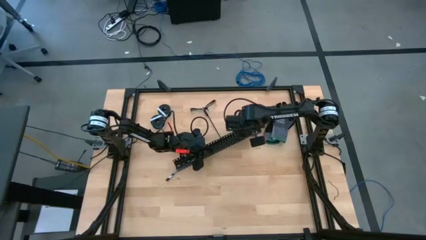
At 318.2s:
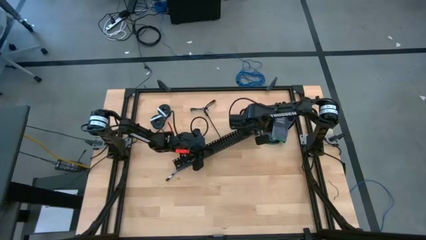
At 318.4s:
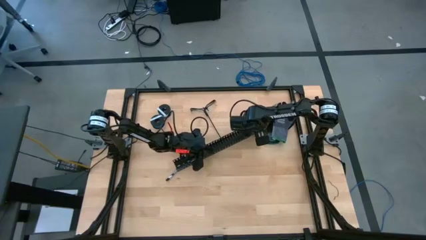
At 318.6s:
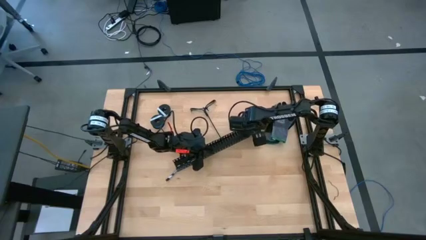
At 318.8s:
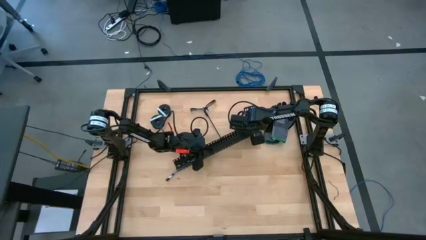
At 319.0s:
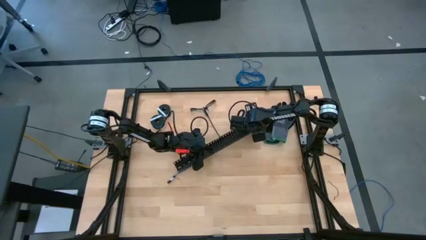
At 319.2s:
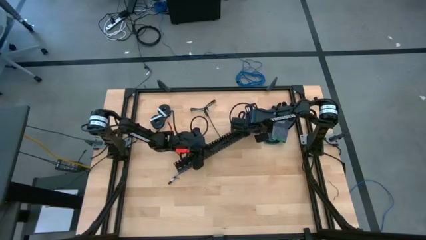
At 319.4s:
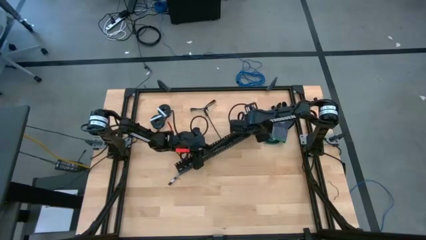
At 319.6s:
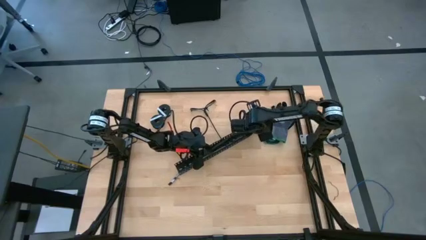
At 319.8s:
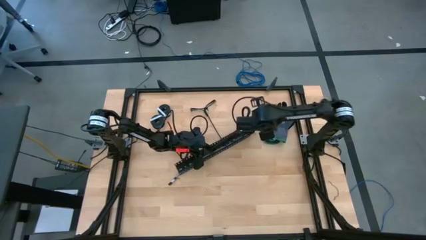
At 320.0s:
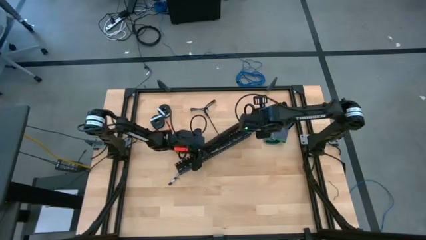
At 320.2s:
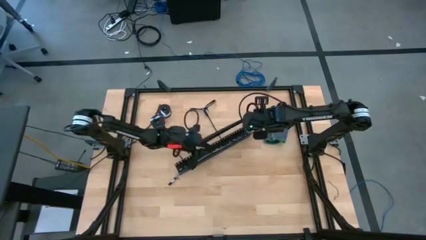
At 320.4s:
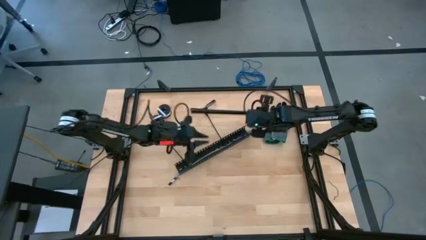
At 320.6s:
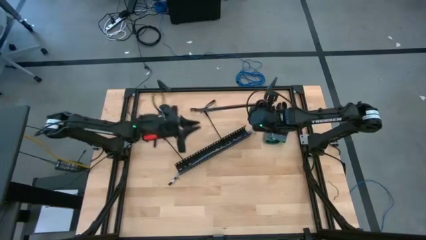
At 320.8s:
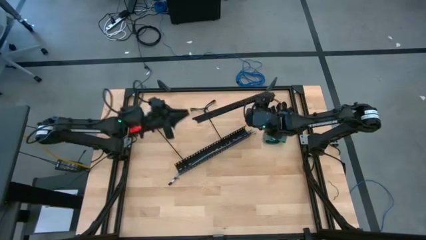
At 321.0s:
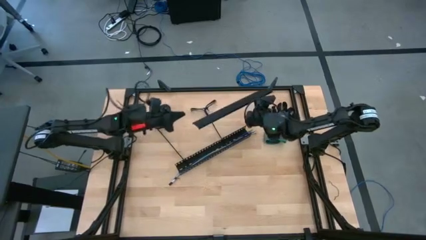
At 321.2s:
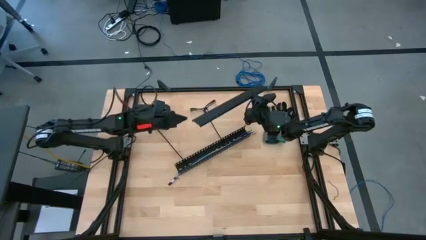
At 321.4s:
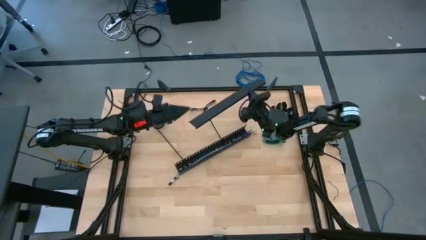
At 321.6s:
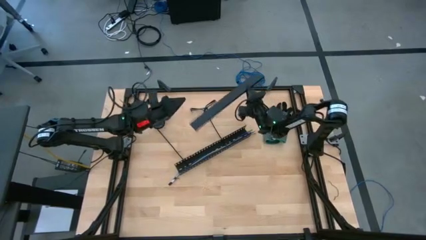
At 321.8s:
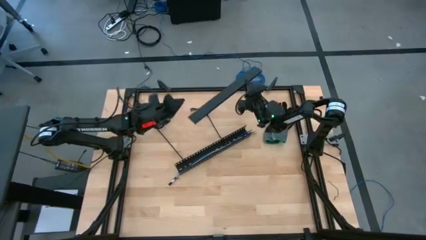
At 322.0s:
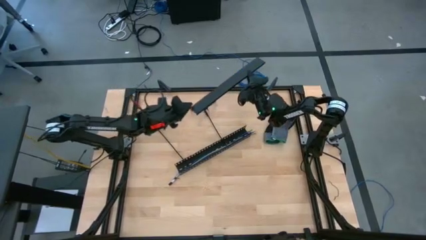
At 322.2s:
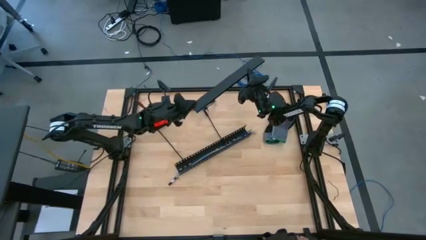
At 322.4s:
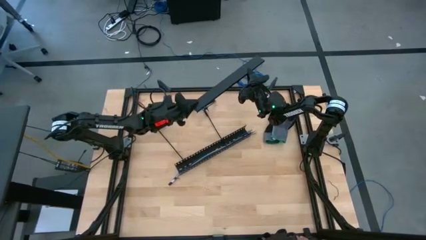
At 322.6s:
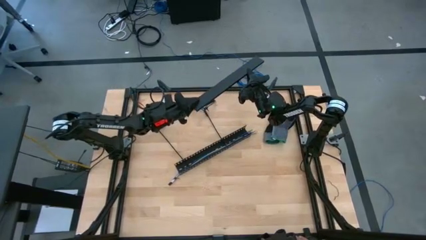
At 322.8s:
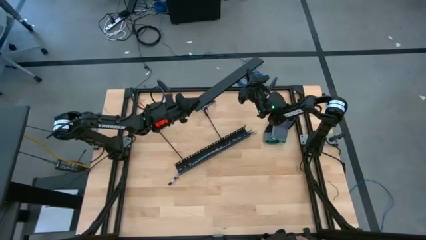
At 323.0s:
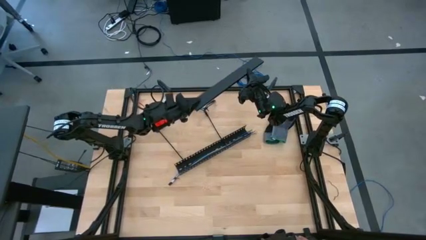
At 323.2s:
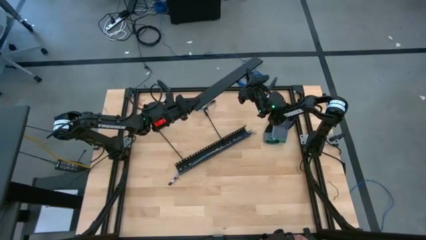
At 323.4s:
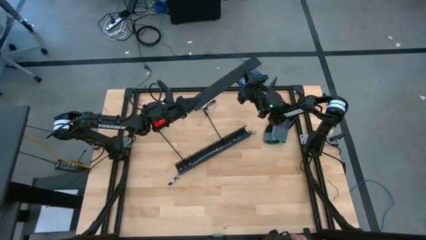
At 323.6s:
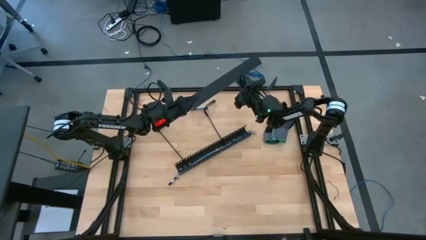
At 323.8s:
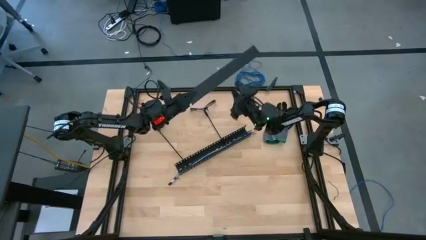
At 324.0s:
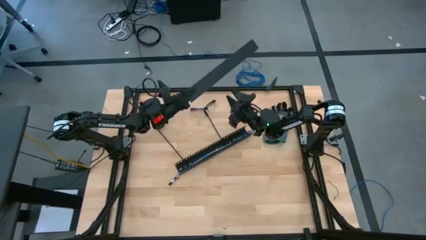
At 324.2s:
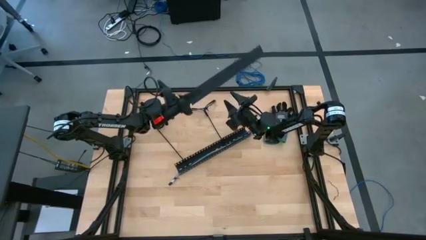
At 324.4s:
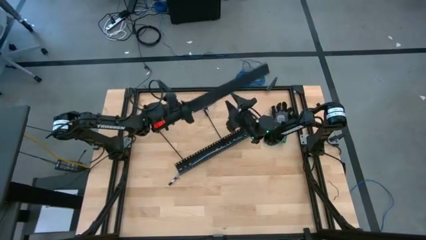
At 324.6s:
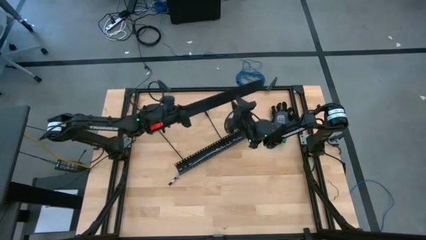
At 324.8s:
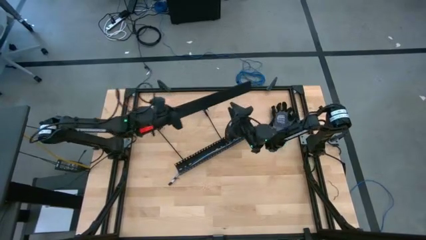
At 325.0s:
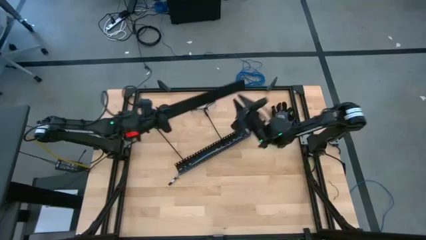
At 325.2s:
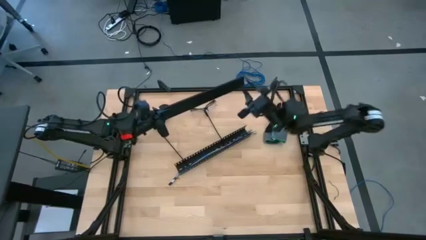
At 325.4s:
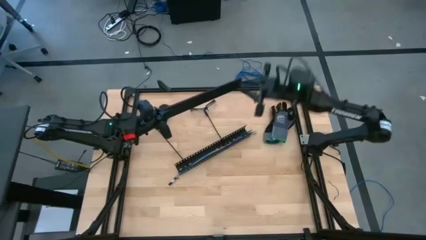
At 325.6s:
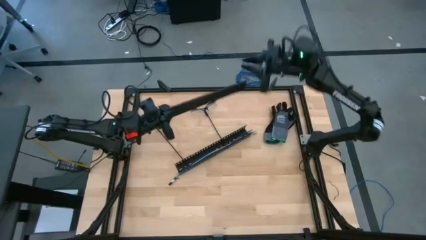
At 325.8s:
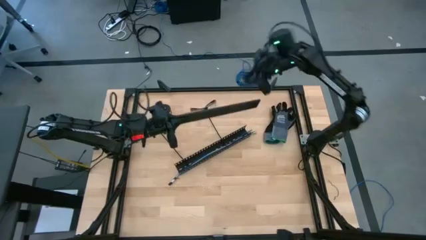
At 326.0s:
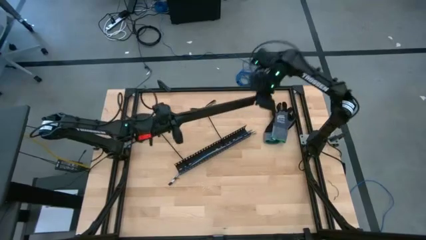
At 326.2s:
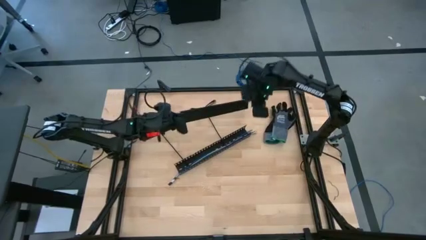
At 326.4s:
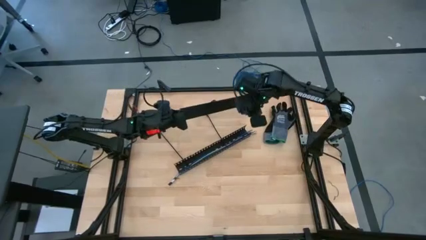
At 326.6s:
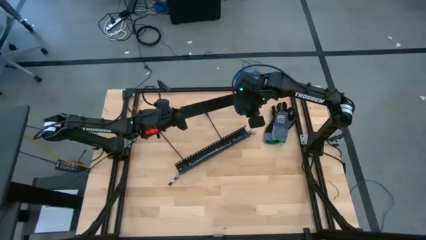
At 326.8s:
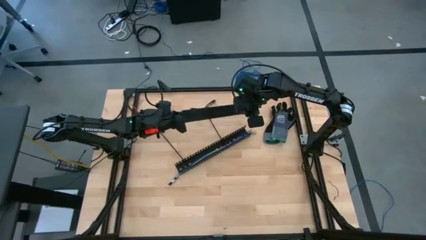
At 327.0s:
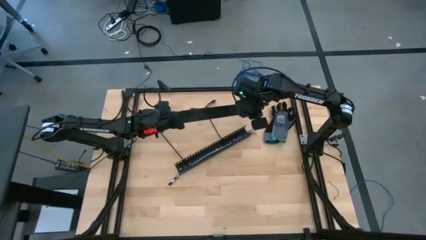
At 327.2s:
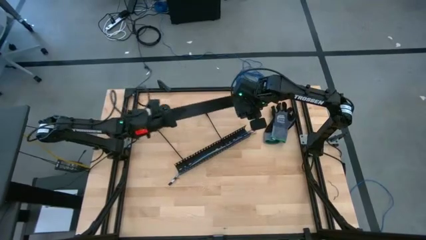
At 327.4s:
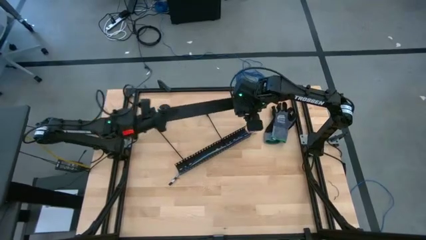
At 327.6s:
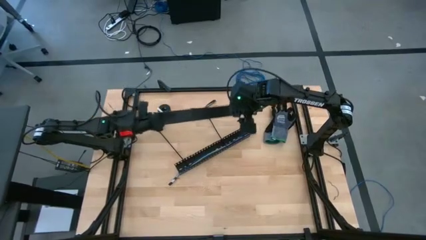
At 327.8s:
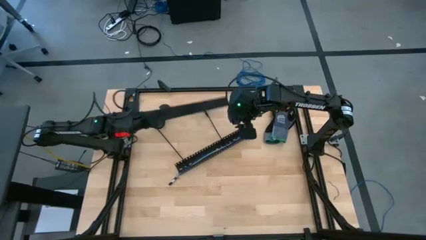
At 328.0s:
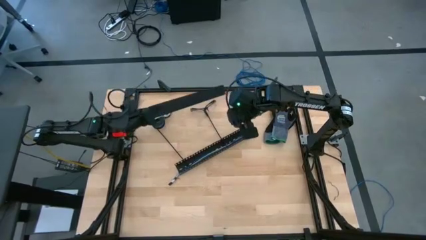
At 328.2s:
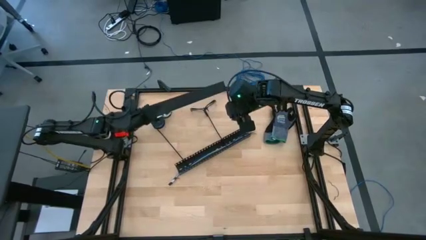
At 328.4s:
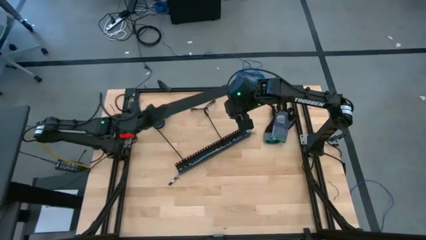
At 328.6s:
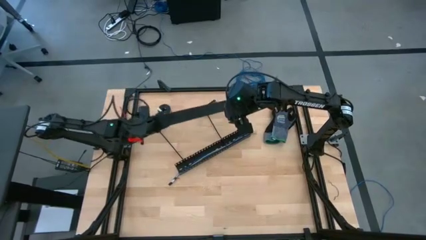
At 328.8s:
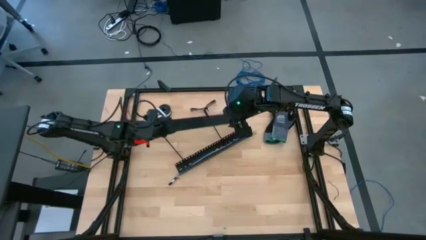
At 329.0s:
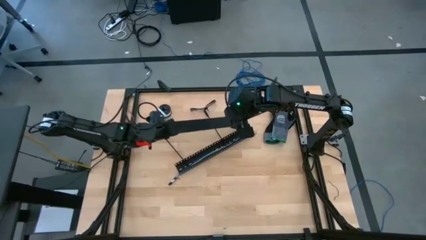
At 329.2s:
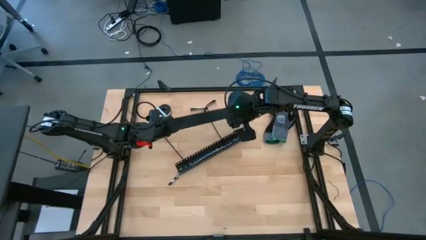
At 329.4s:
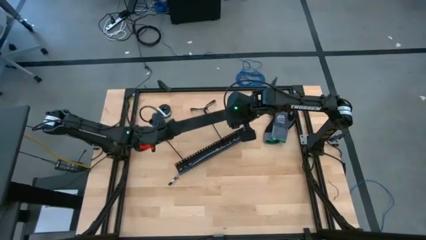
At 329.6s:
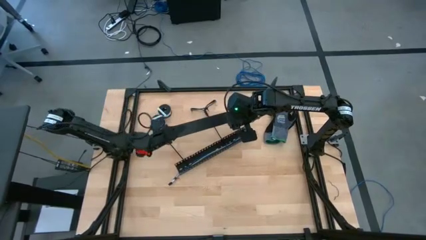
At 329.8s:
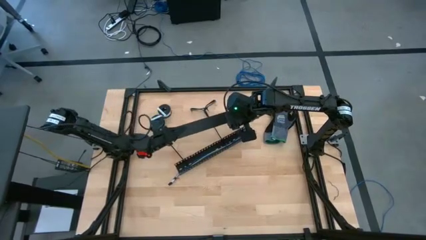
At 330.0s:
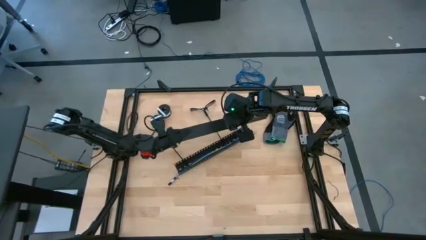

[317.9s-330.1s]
Task: Ziptie cables
Insert the black cover of the black cable duct

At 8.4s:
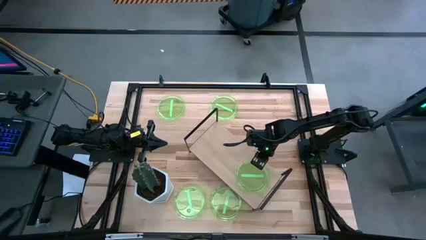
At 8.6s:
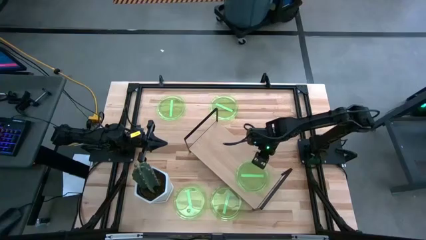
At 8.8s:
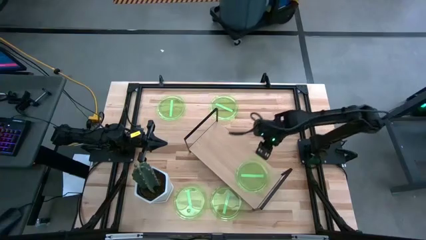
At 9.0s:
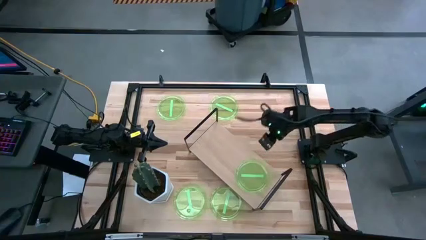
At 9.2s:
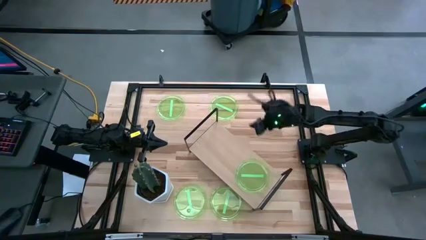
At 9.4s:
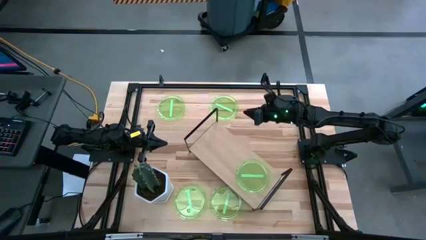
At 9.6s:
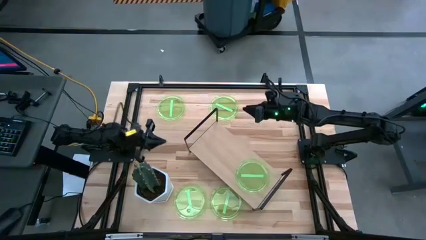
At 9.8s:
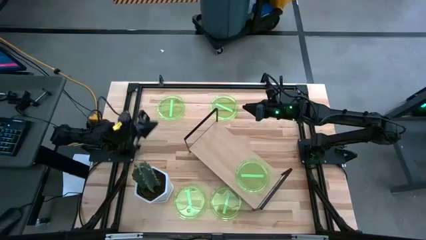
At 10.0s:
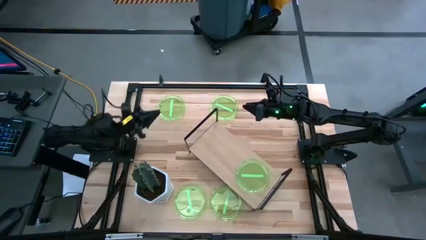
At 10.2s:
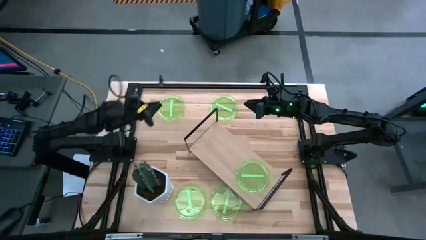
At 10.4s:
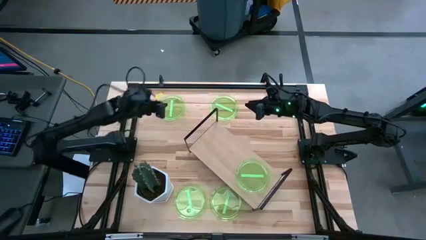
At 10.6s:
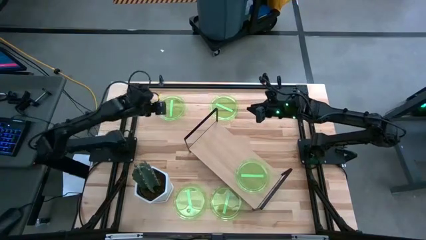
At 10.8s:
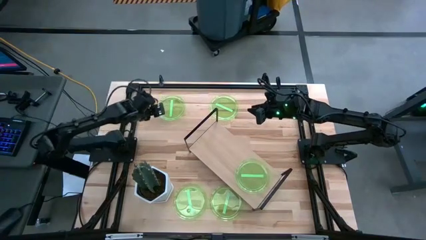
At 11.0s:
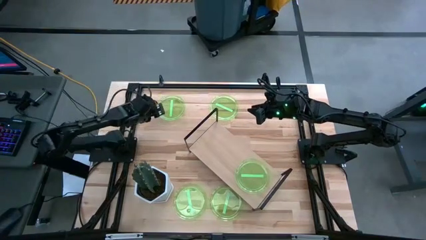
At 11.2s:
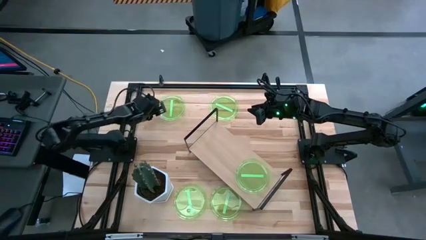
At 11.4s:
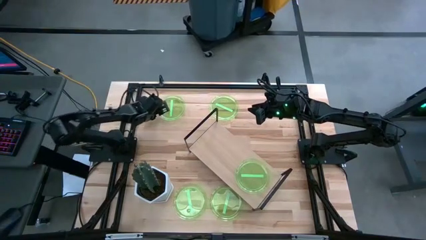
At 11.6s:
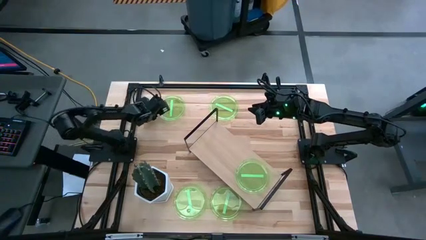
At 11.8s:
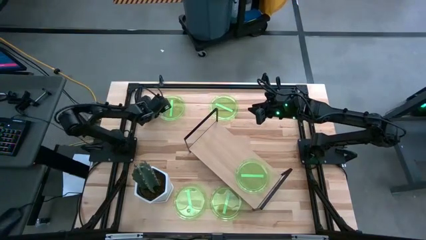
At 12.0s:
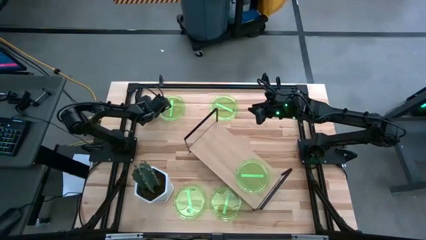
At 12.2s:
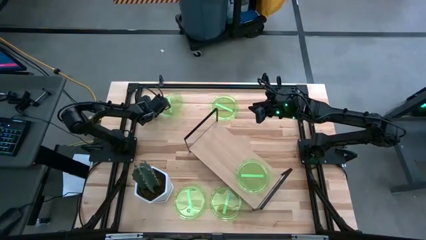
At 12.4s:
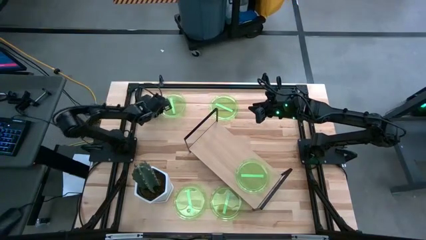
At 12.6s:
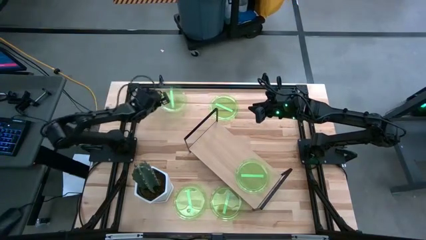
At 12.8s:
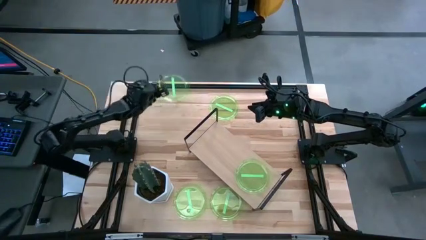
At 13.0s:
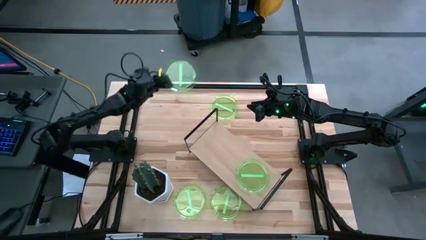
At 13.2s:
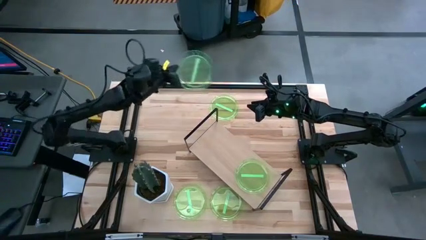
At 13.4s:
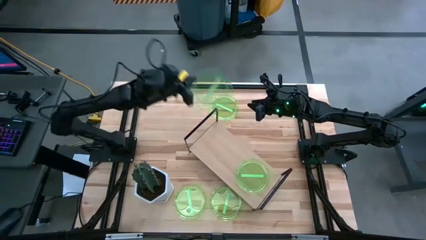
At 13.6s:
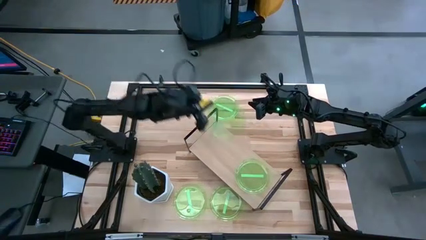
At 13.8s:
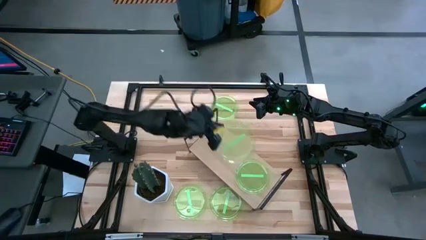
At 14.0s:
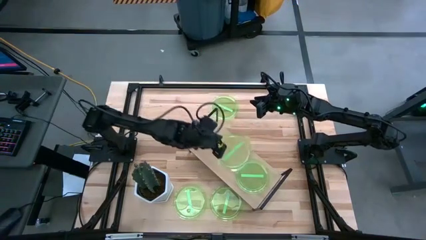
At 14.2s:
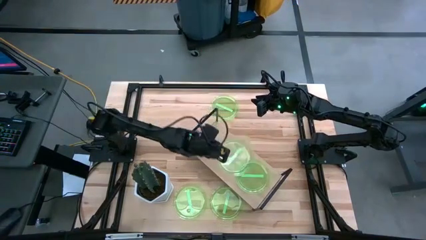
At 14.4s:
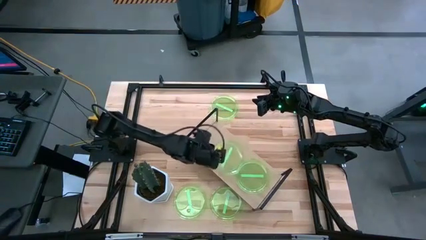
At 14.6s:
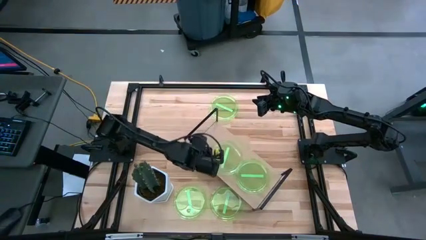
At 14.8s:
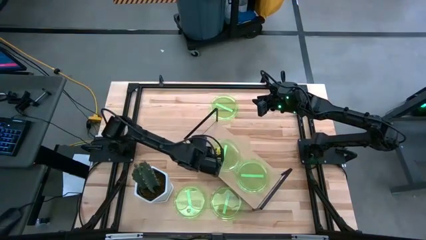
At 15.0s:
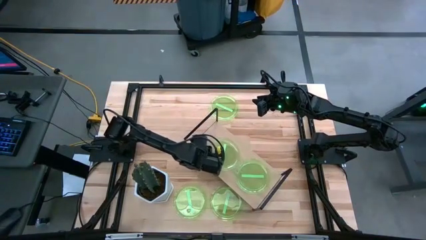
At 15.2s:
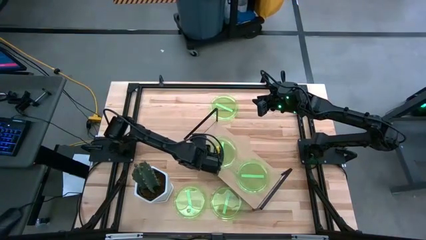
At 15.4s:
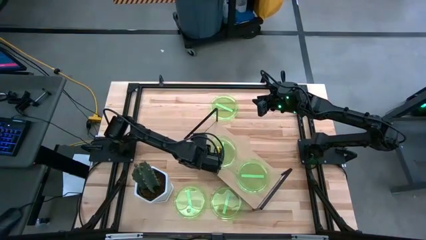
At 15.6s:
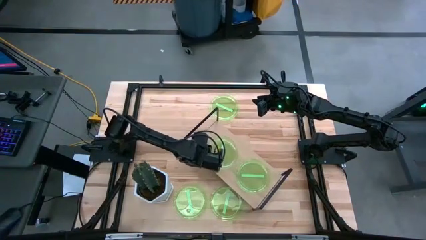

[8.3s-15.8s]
Task: Place and stack plates onto a shelf
Put the top left transparent green plate on the shelf
